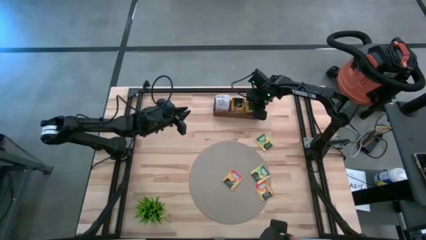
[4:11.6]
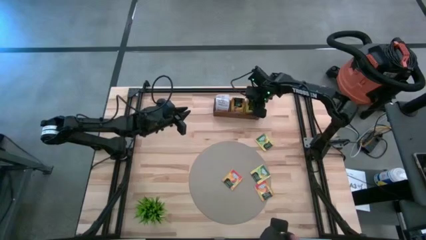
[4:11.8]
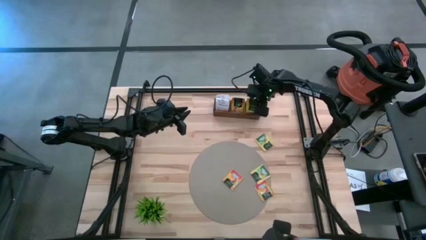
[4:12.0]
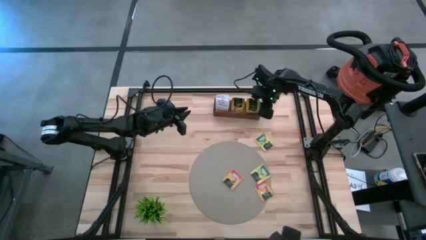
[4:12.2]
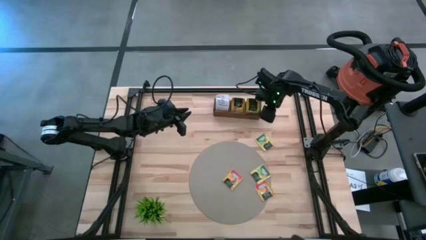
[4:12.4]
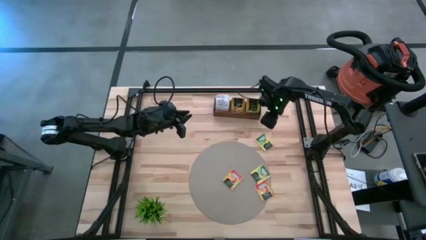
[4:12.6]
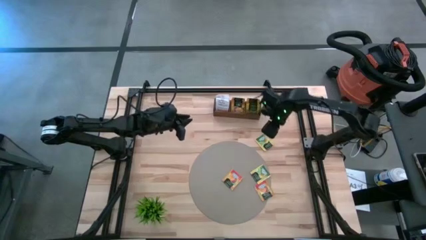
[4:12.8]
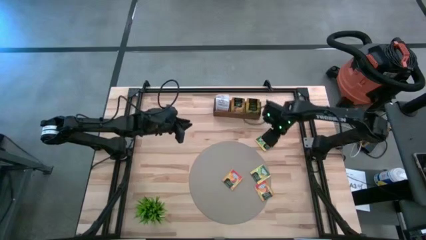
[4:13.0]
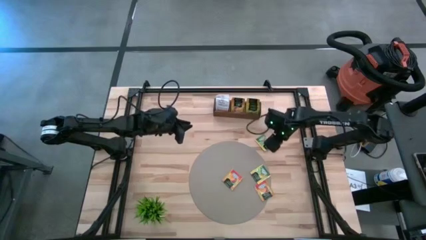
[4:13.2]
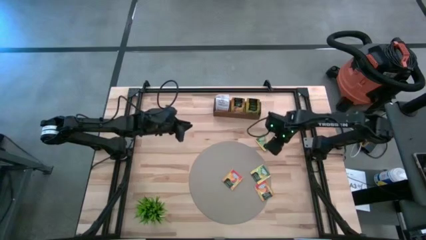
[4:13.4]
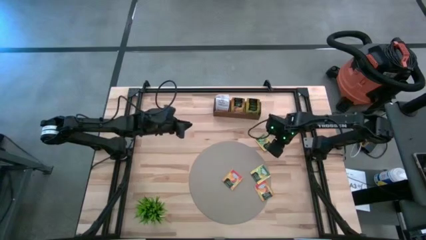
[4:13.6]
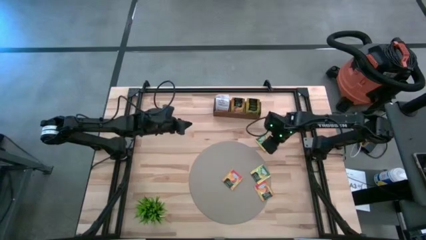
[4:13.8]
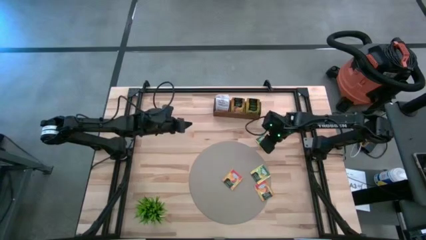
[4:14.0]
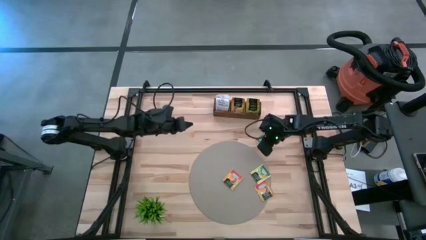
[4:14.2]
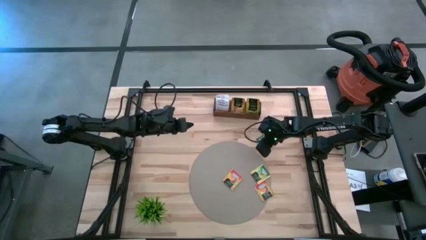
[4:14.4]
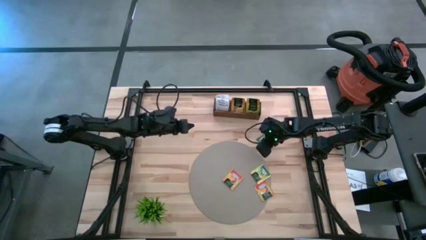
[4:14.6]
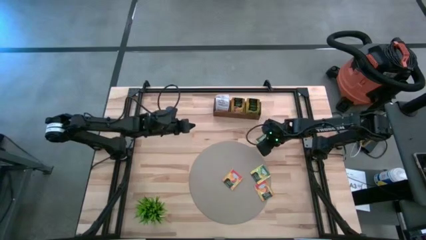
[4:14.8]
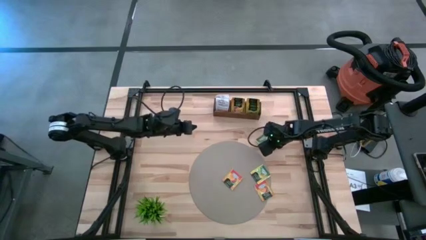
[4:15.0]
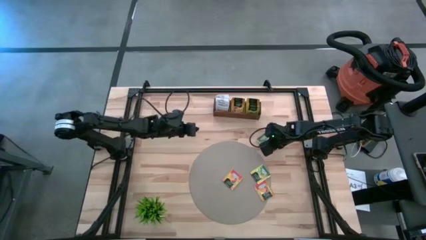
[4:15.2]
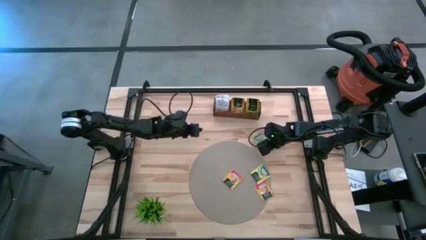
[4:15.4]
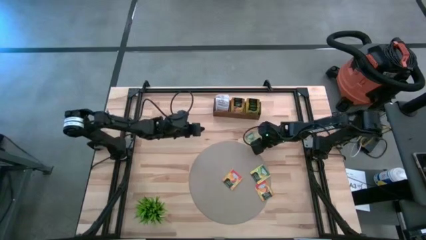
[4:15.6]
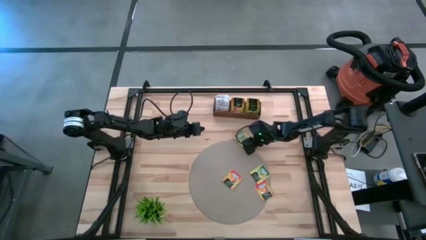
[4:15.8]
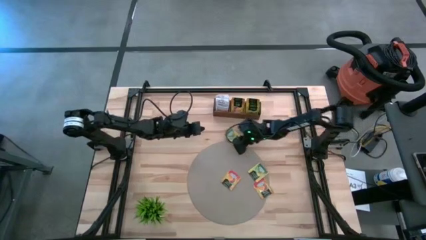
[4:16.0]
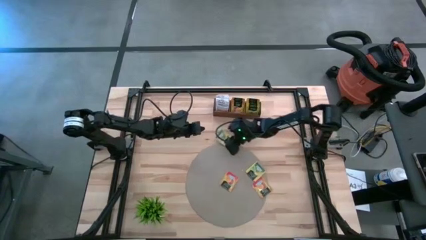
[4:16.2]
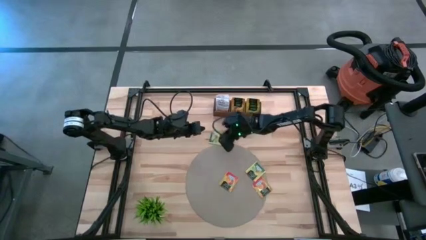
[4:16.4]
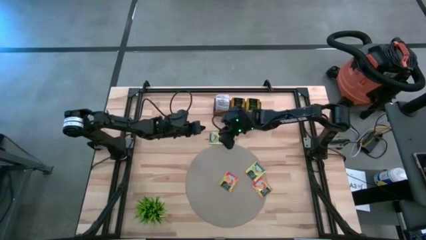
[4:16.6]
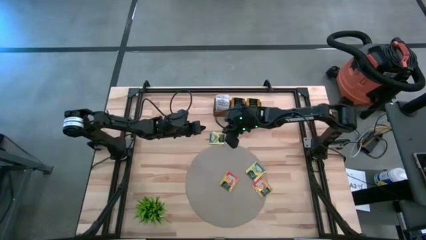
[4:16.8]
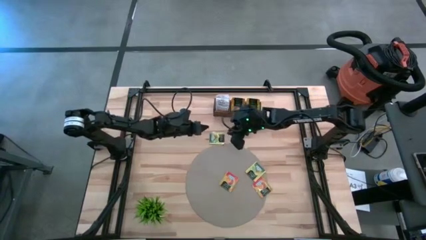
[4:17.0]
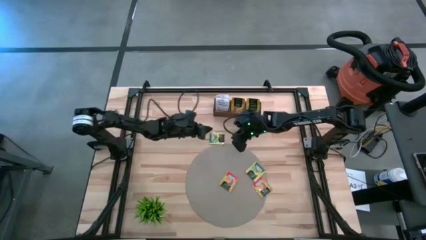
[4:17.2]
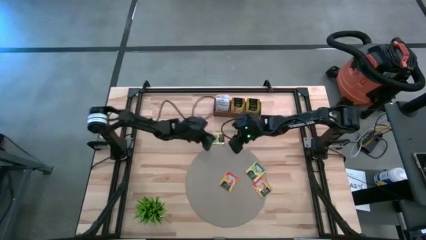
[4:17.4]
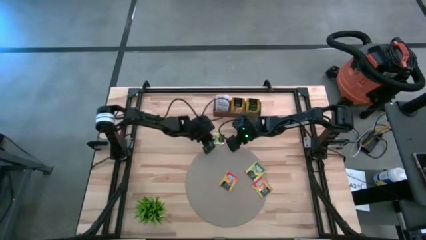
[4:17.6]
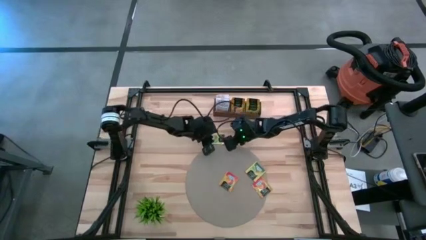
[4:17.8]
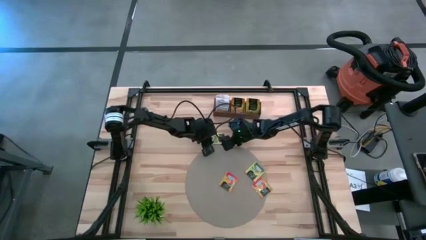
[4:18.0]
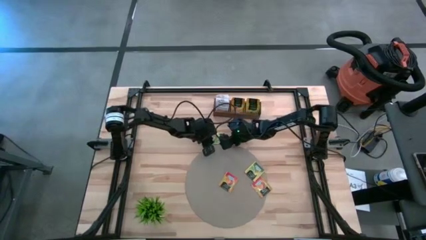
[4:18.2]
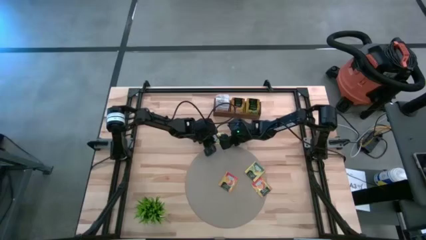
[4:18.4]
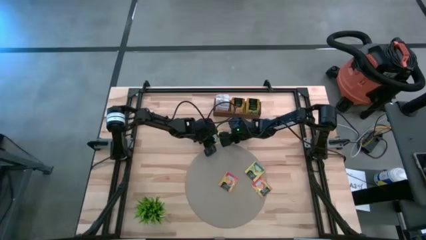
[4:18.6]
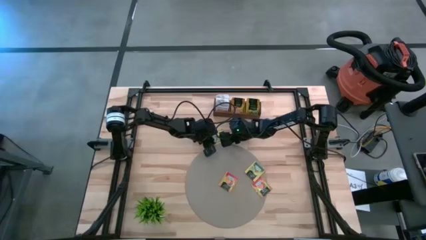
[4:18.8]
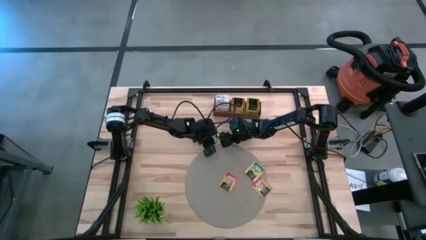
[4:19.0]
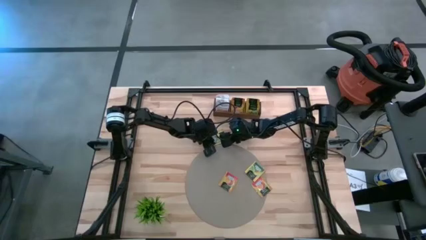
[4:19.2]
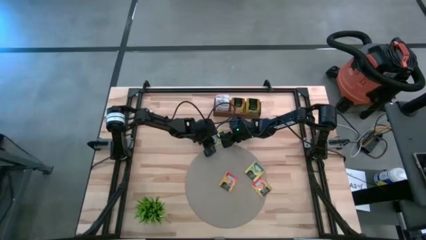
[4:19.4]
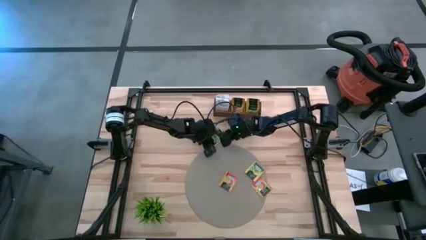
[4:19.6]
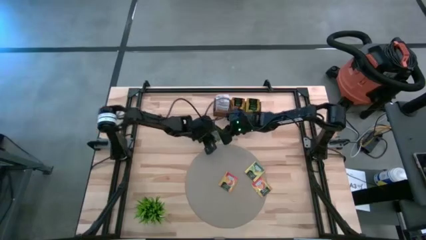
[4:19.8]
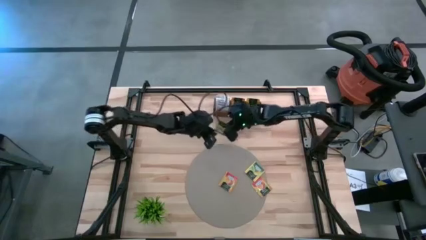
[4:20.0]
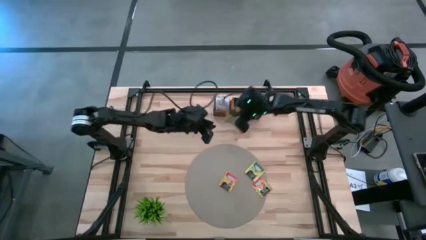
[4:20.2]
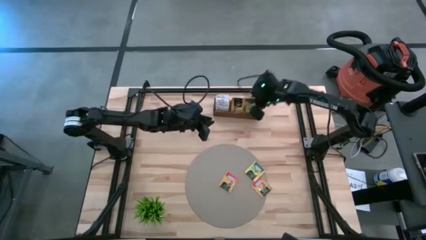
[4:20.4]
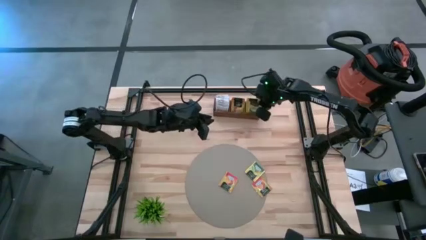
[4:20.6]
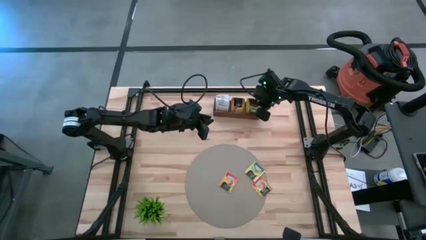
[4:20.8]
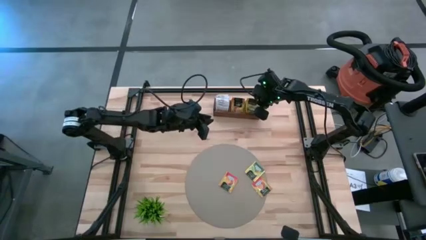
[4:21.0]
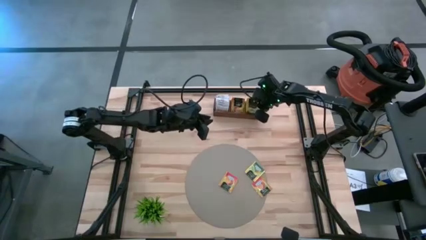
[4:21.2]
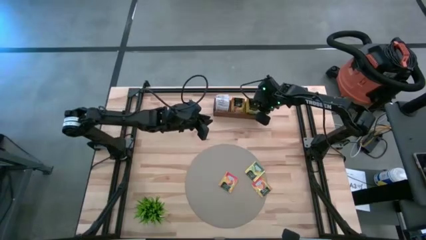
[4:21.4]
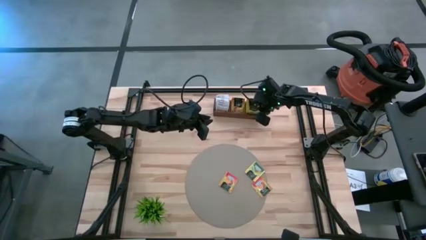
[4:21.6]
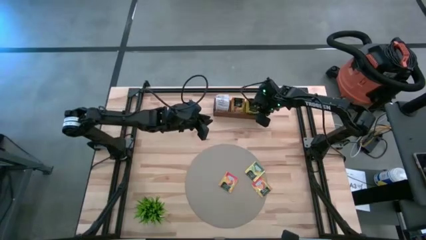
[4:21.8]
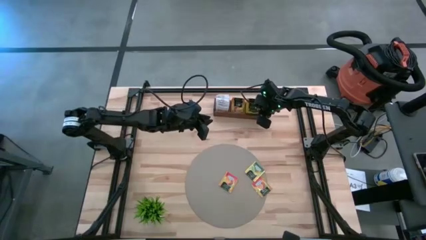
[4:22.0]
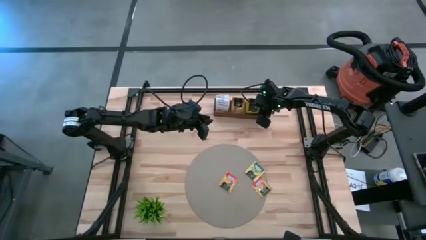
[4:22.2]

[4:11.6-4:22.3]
Task: Pick & Place Tea
Put the yellow tea bag into the right section of the wooden organizer
